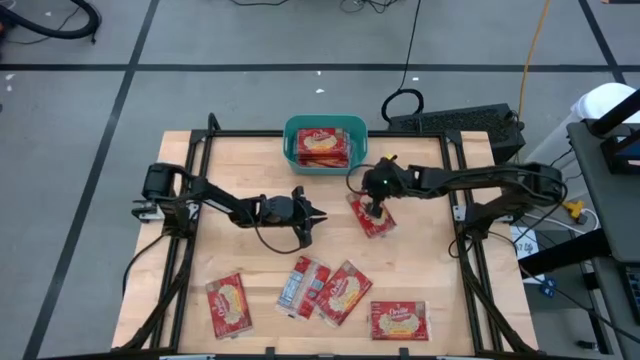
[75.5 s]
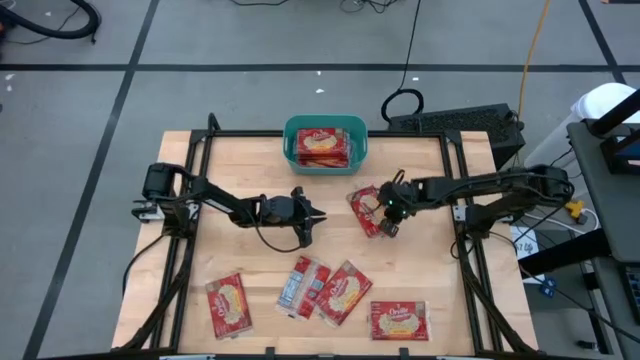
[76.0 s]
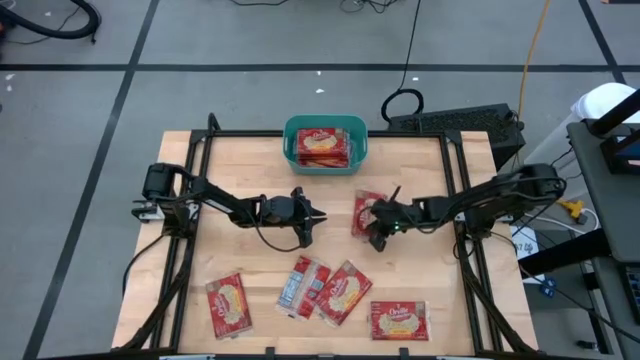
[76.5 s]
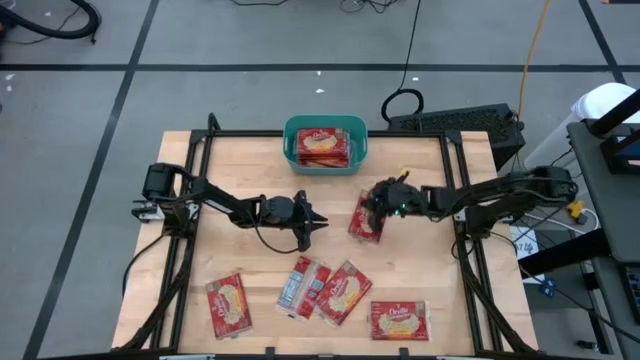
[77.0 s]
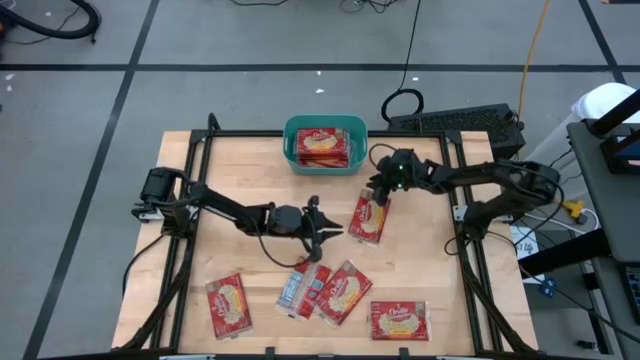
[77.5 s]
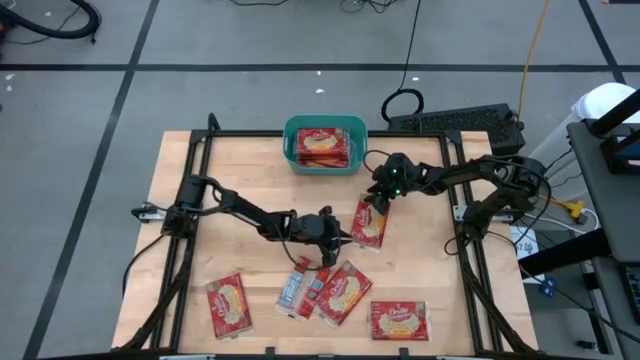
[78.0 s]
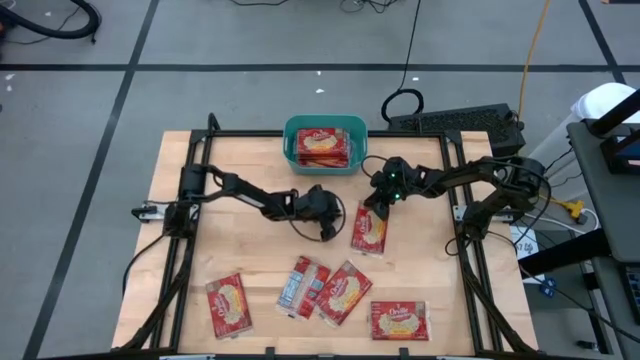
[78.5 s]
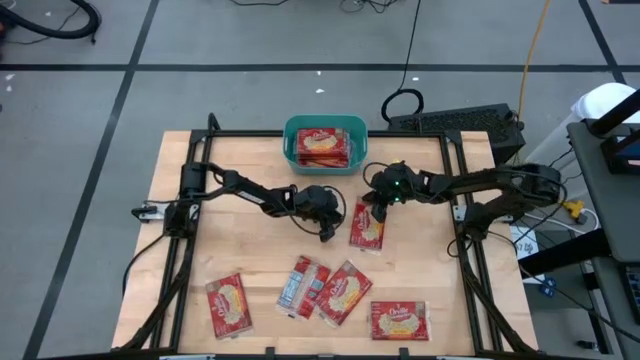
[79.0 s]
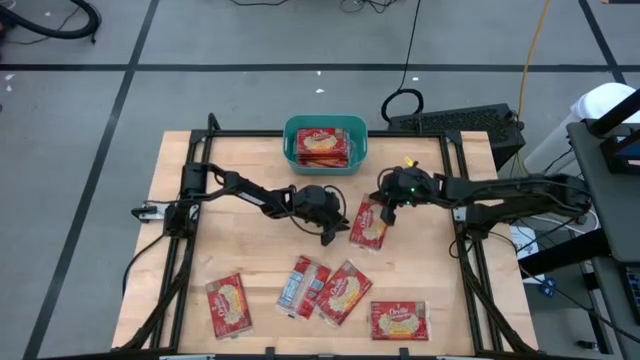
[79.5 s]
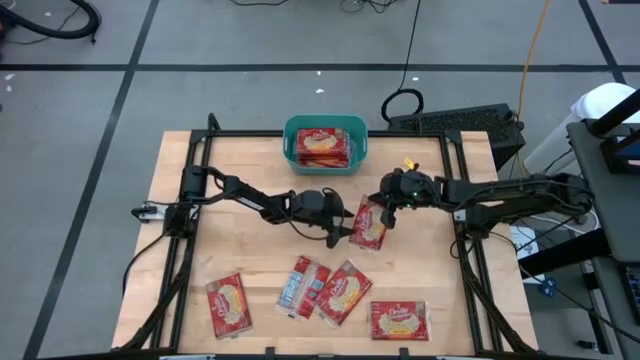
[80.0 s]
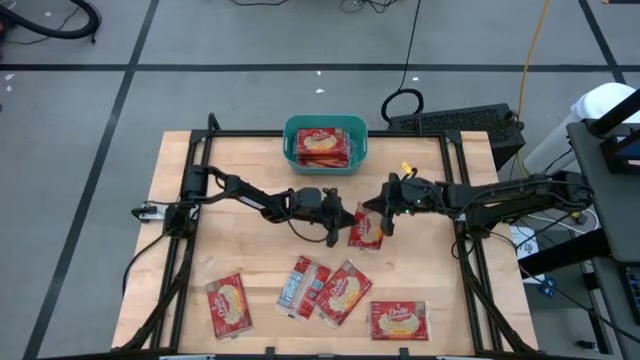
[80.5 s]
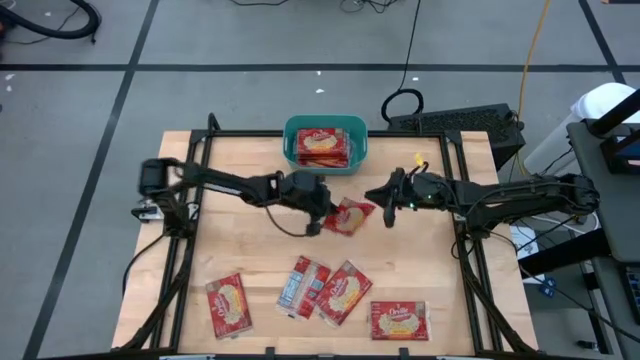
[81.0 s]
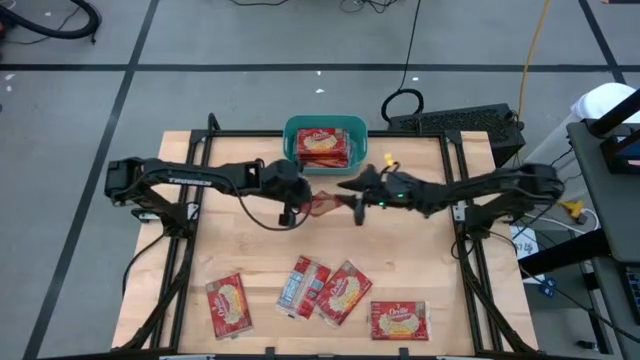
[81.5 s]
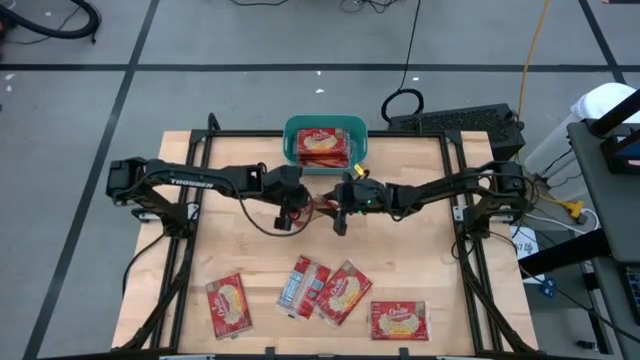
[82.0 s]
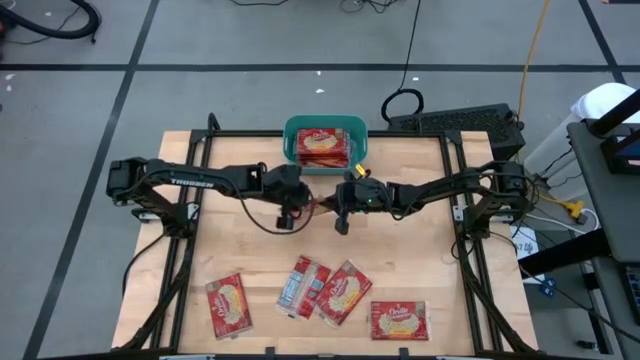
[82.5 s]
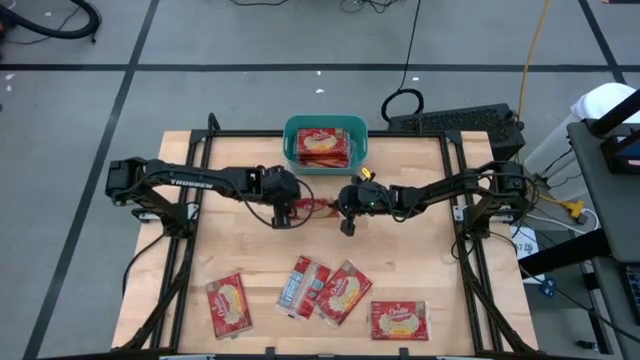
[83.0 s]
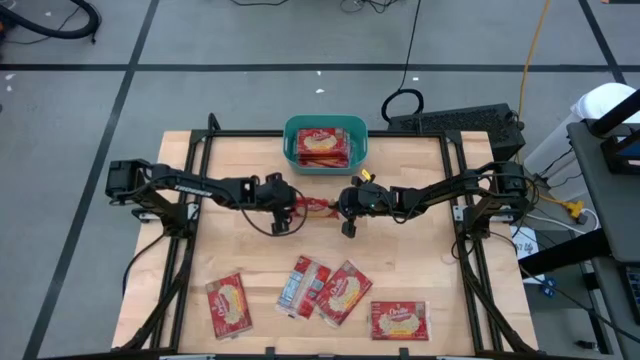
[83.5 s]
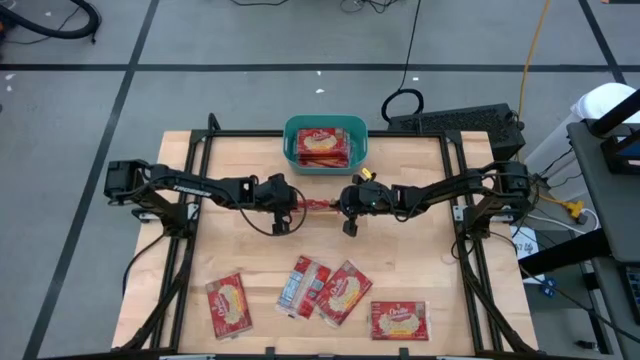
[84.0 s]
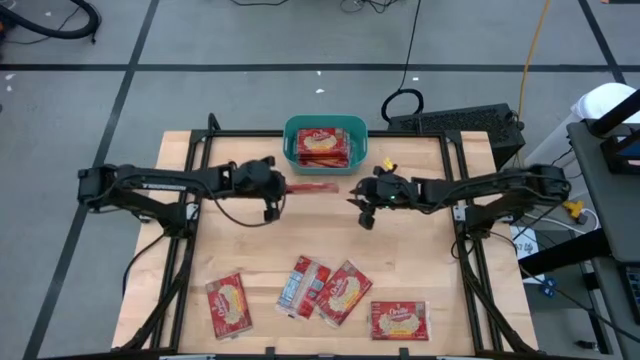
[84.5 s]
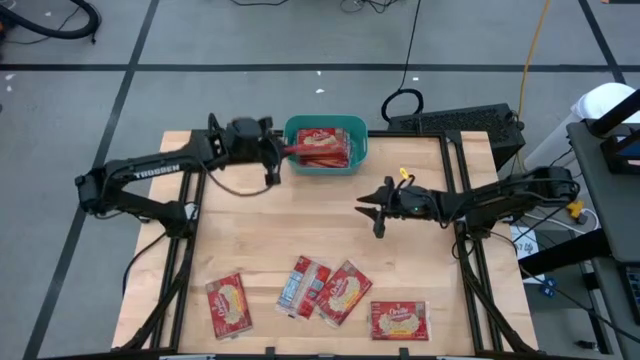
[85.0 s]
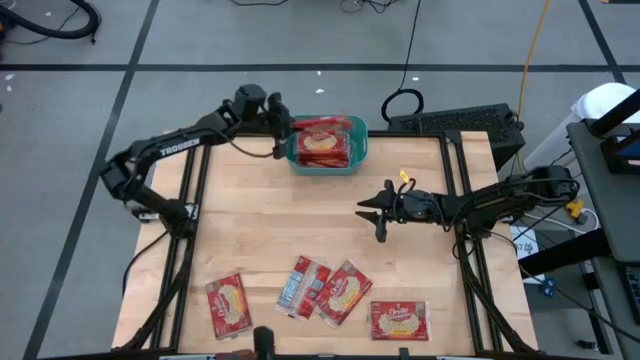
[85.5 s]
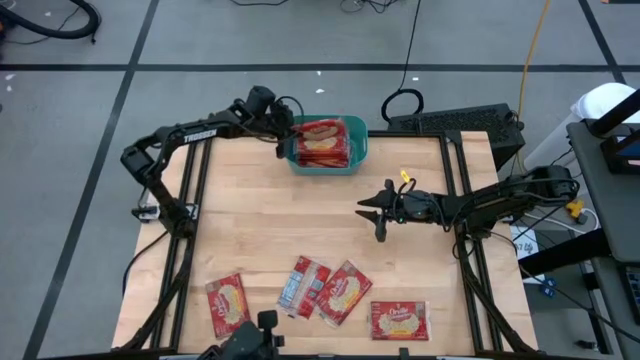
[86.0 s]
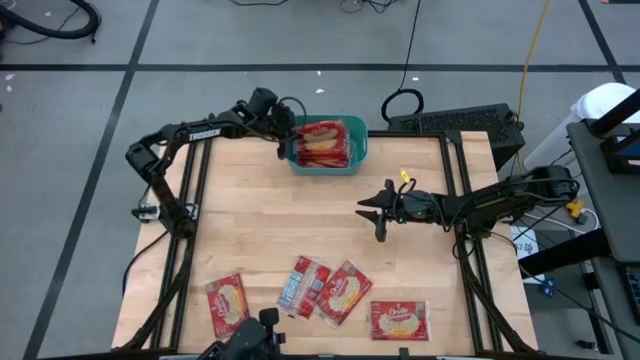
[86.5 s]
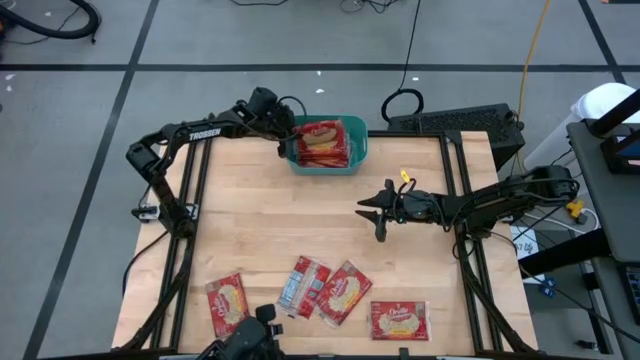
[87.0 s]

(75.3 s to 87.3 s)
Task: Sort popcorn bags into baskets
Put the red popcorn bag into the green bin

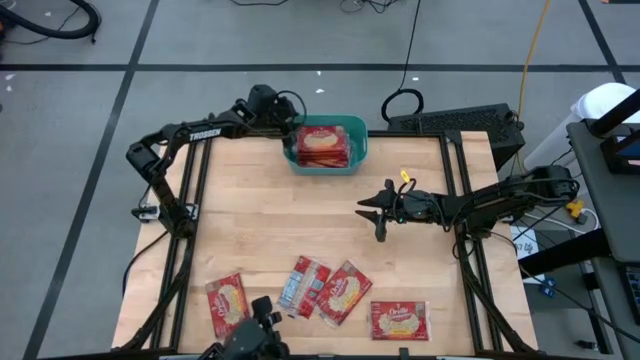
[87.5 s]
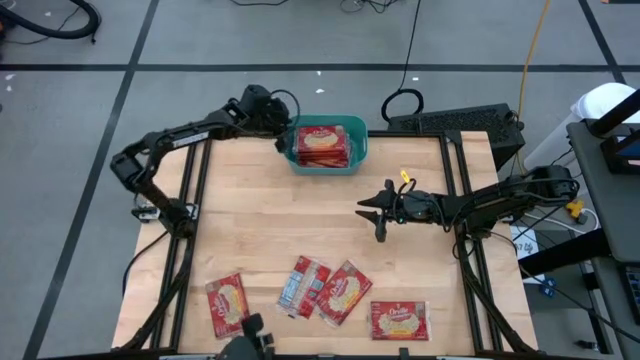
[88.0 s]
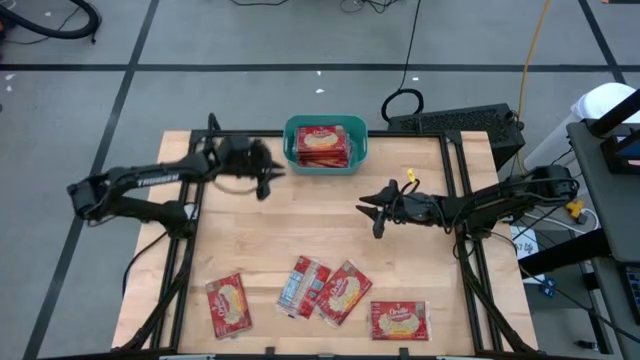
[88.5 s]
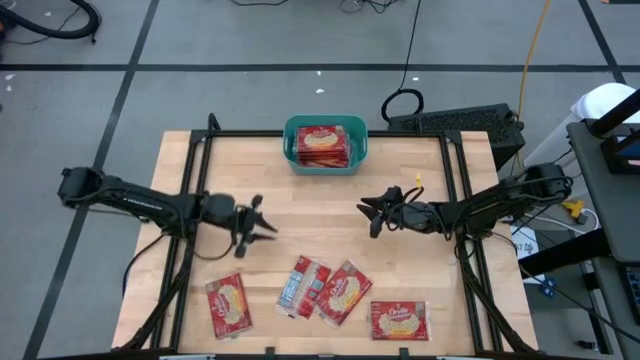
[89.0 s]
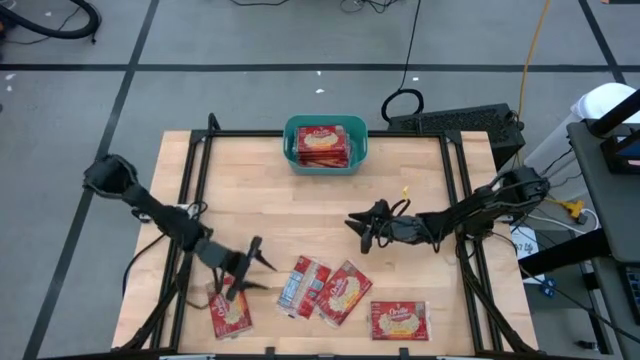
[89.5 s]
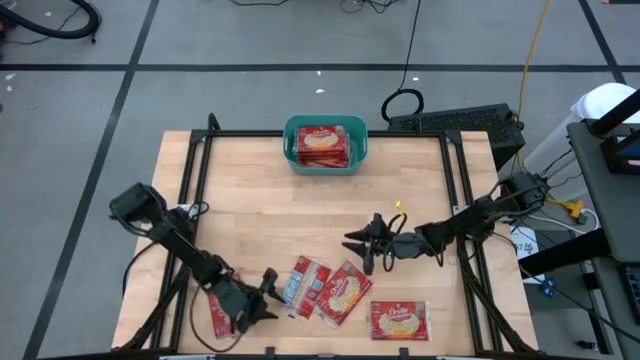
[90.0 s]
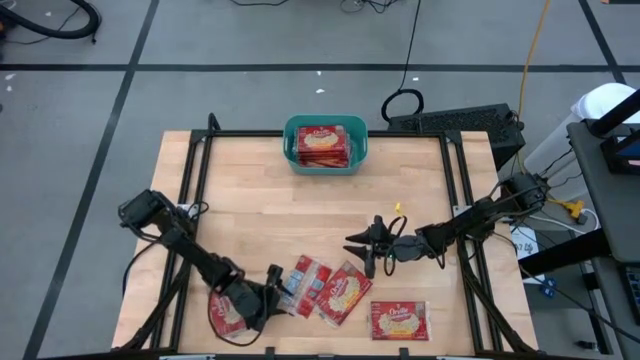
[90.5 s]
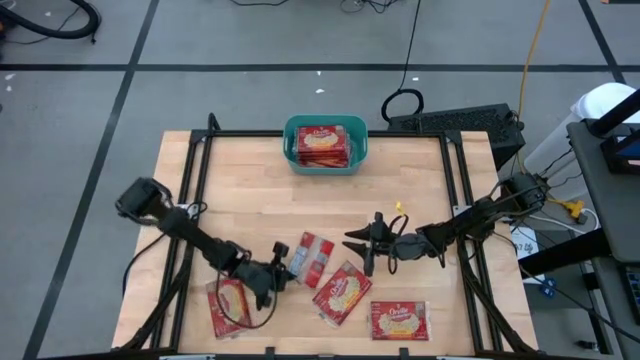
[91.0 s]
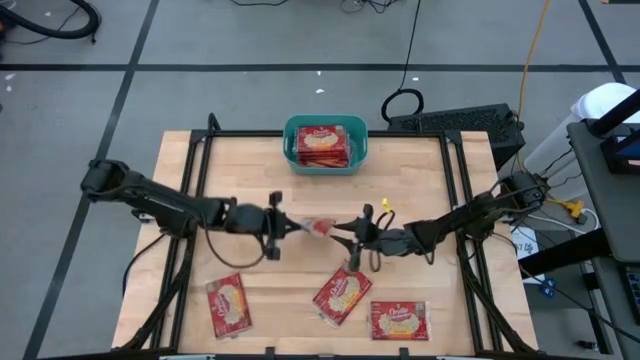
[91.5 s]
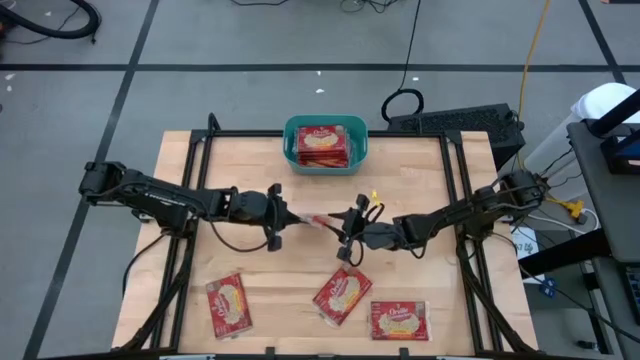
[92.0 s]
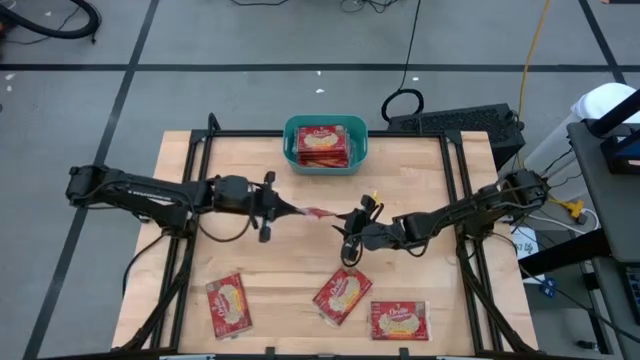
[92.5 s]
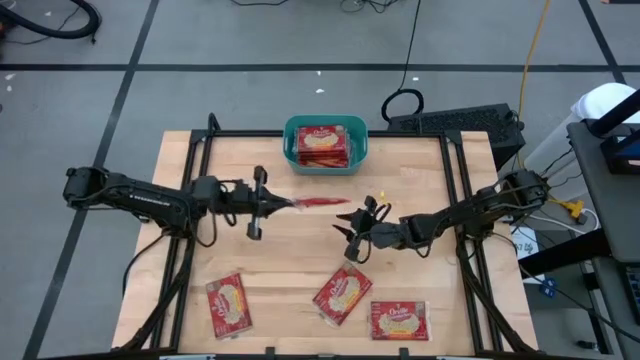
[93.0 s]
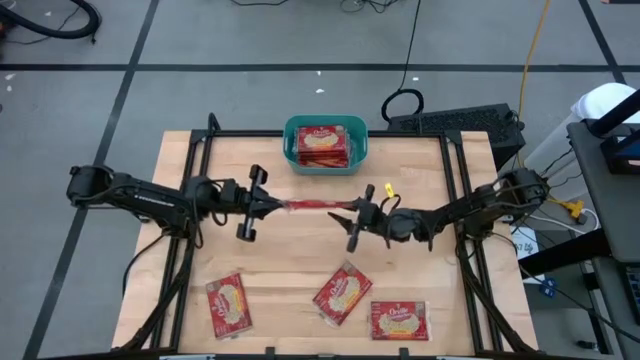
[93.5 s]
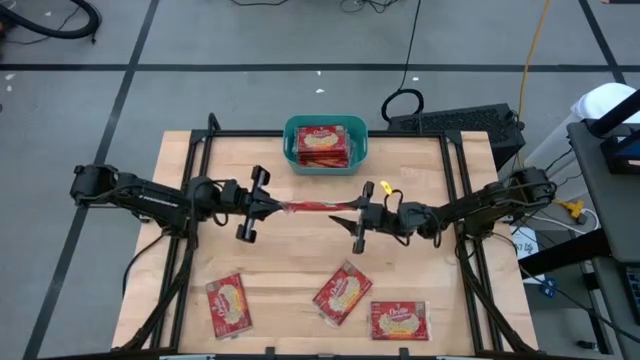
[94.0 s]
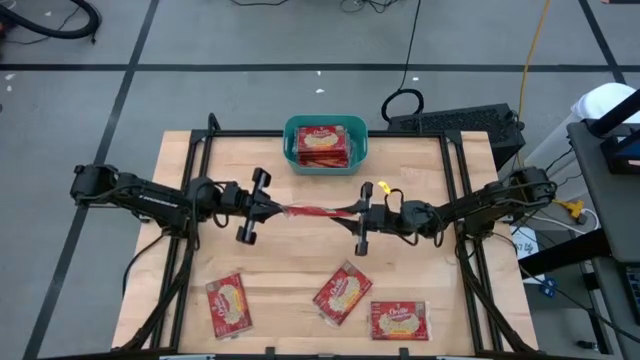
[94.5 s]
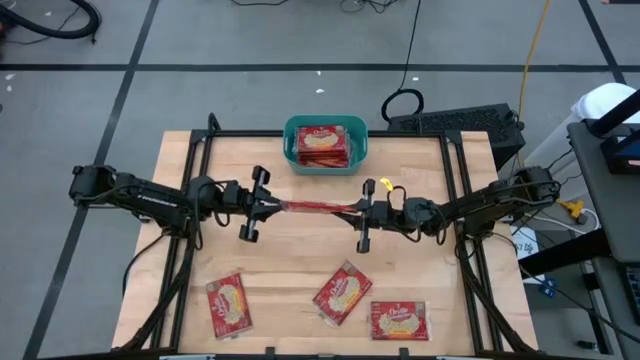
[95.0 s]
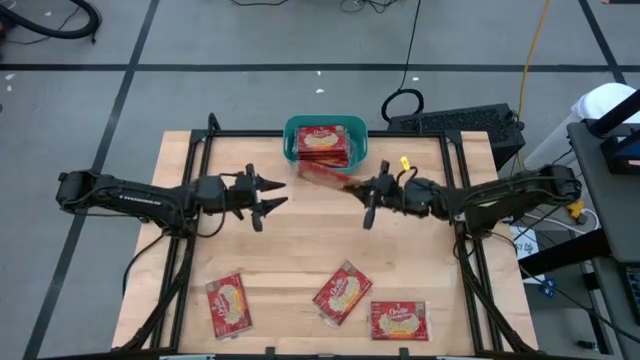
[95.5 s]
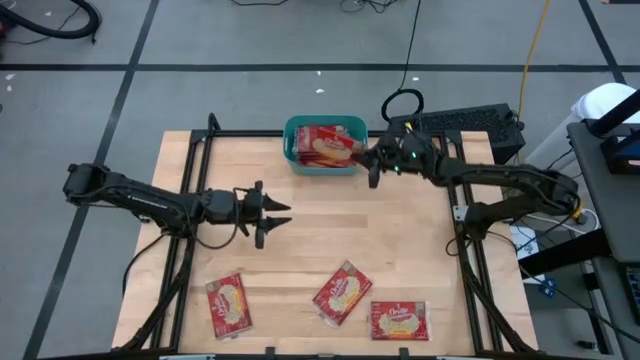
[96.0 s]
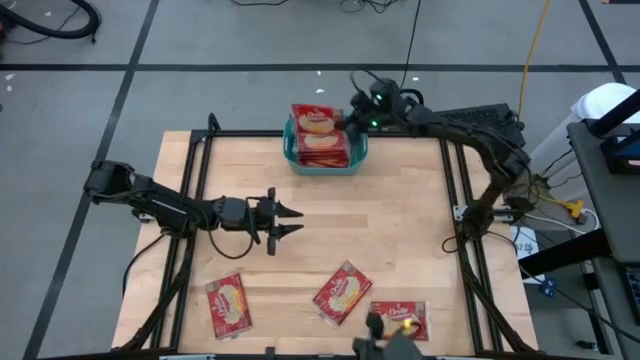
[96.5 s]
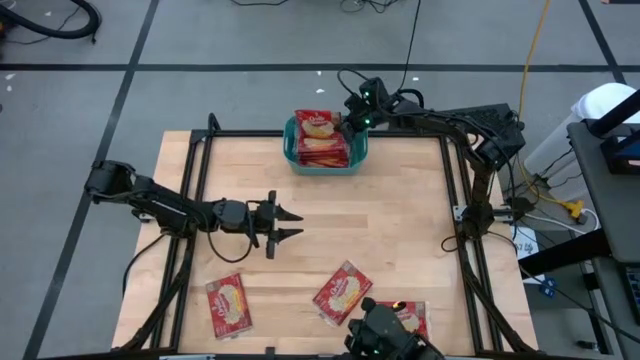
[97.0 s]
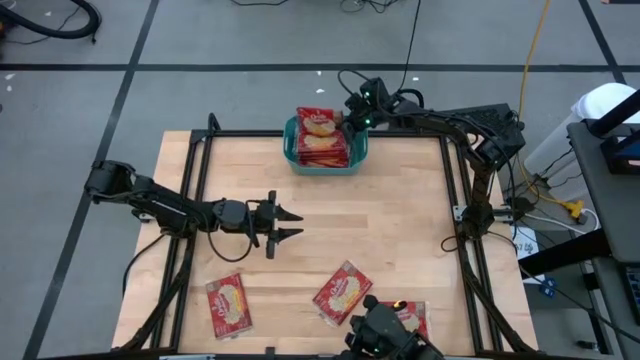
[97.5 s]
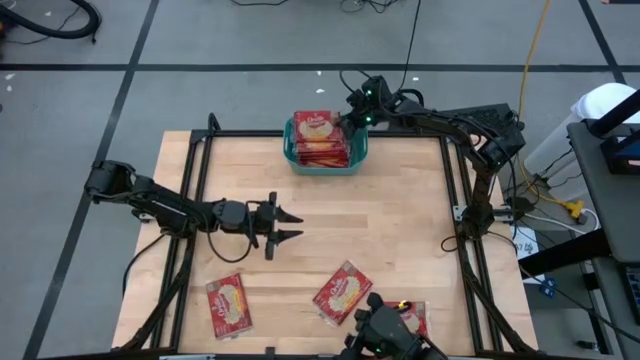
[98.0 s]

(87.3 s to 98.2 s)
Put the red popcorn bag into the green bin
